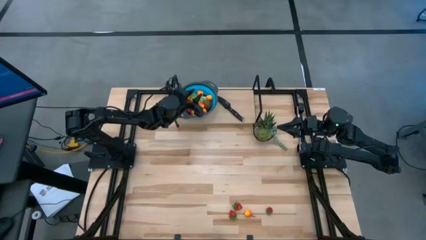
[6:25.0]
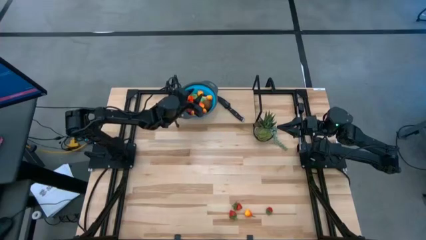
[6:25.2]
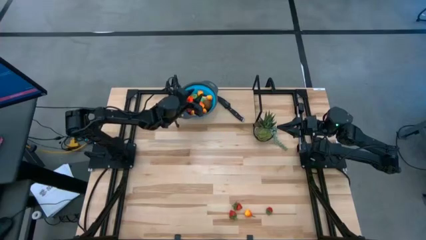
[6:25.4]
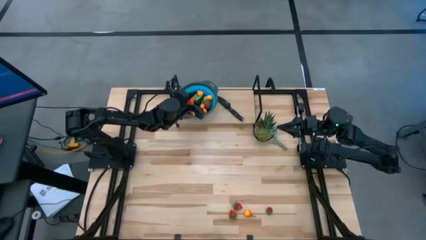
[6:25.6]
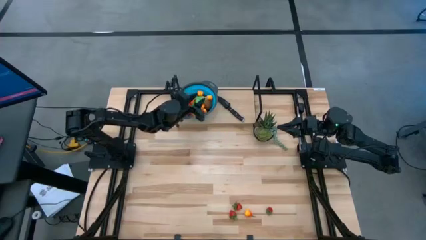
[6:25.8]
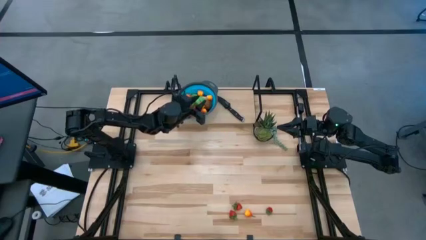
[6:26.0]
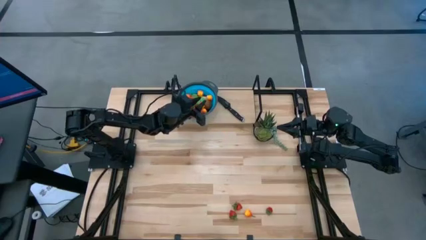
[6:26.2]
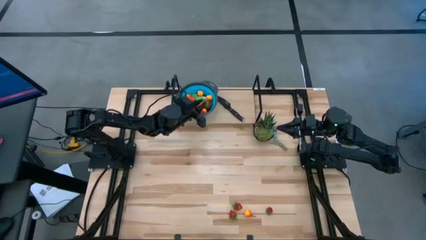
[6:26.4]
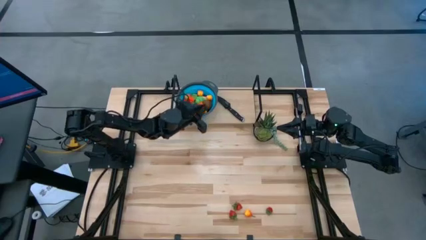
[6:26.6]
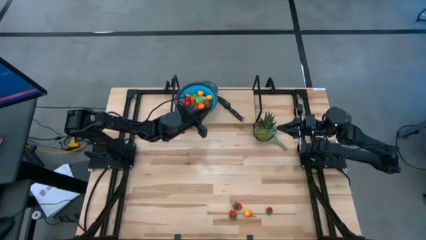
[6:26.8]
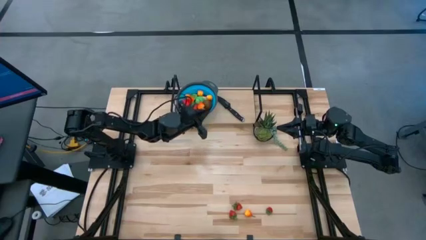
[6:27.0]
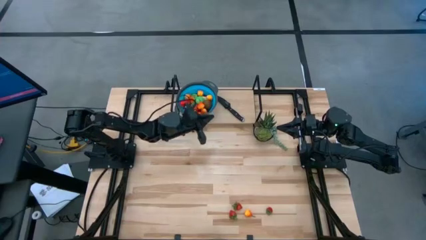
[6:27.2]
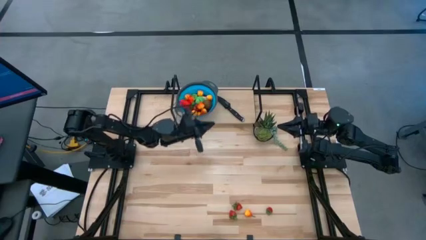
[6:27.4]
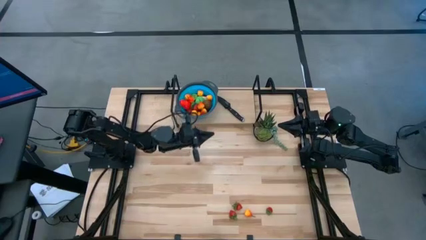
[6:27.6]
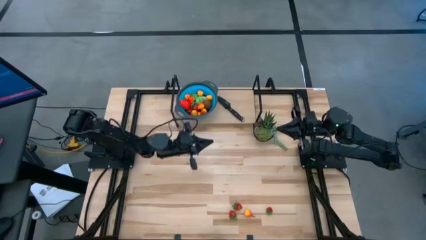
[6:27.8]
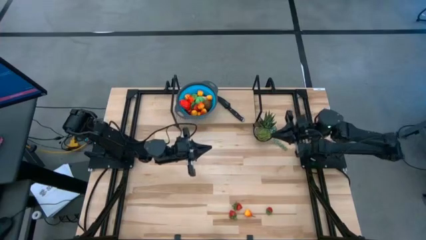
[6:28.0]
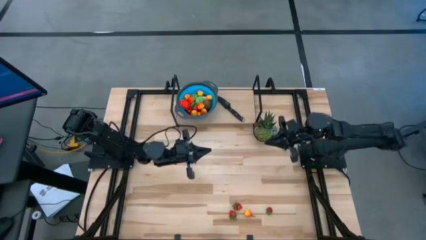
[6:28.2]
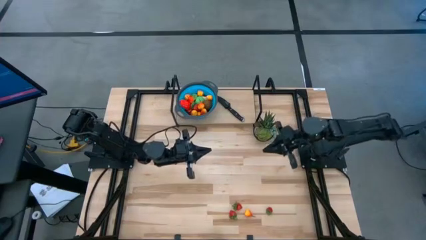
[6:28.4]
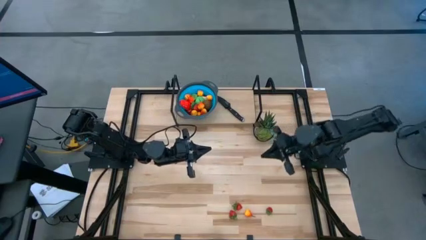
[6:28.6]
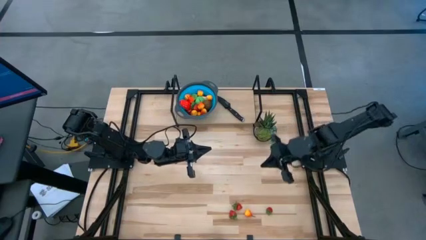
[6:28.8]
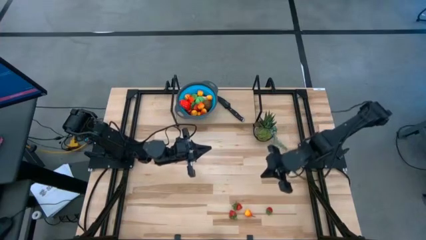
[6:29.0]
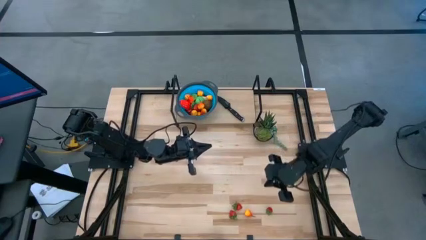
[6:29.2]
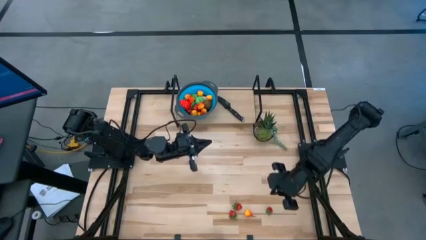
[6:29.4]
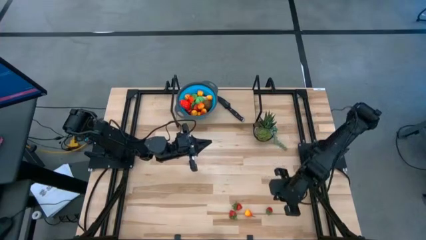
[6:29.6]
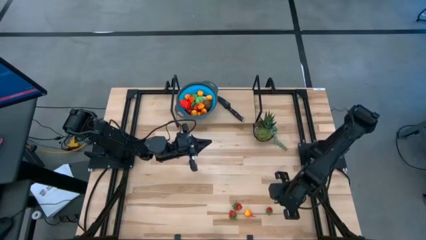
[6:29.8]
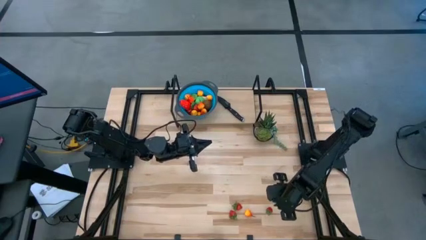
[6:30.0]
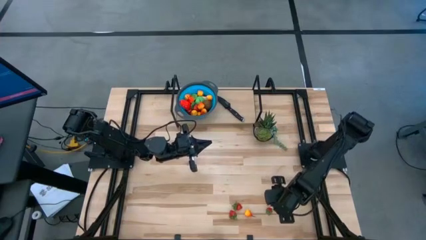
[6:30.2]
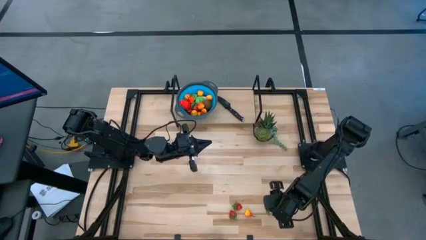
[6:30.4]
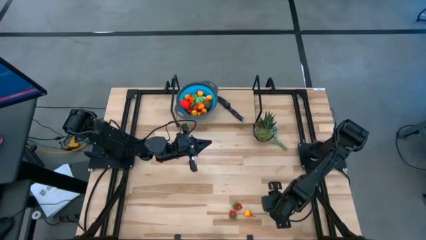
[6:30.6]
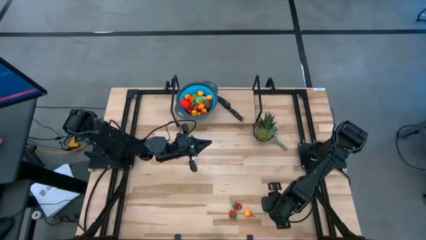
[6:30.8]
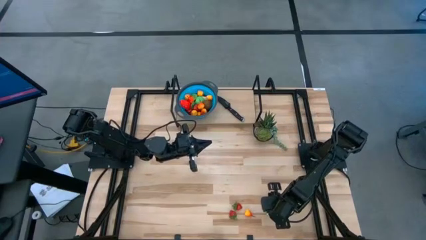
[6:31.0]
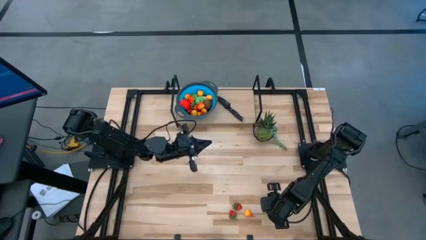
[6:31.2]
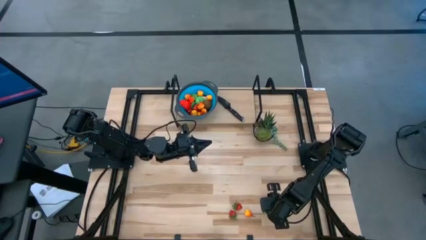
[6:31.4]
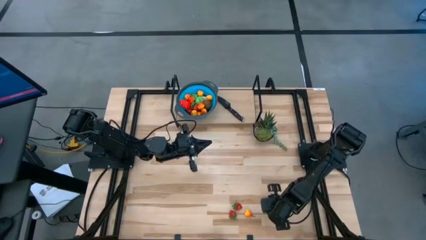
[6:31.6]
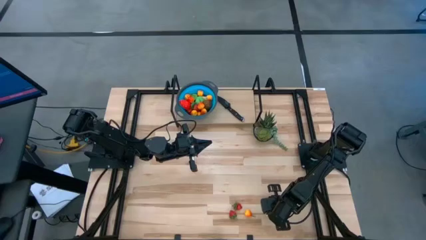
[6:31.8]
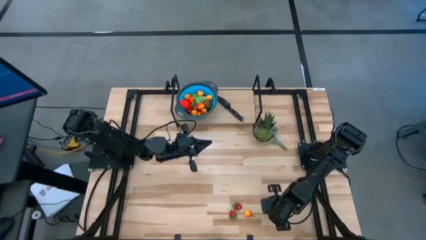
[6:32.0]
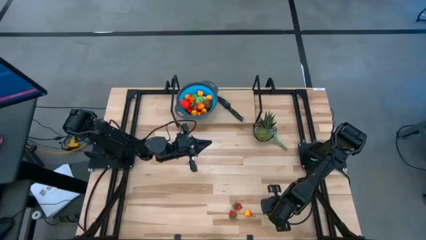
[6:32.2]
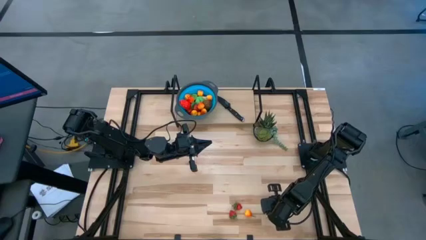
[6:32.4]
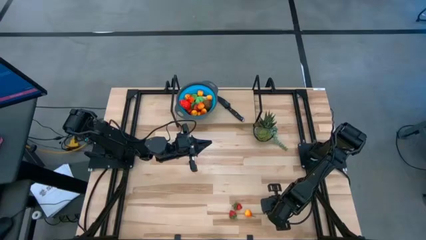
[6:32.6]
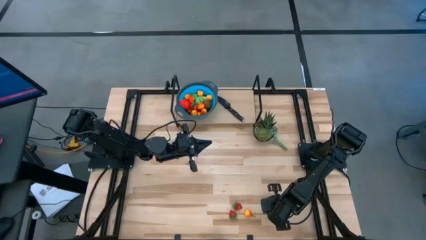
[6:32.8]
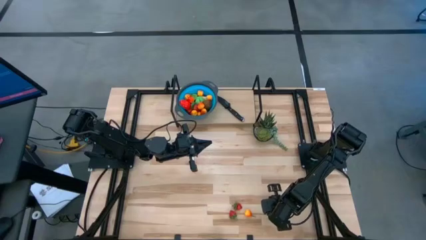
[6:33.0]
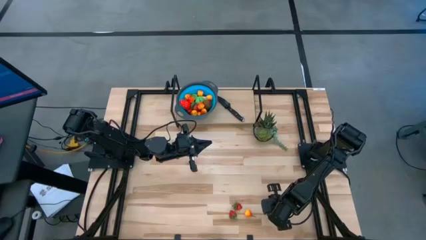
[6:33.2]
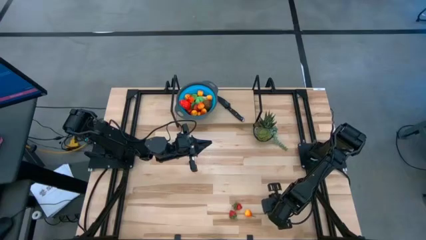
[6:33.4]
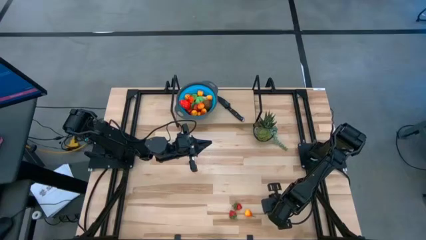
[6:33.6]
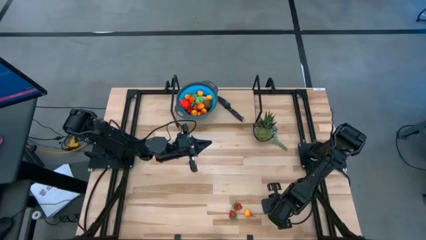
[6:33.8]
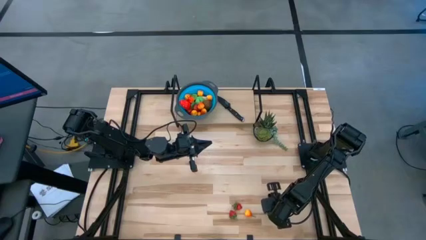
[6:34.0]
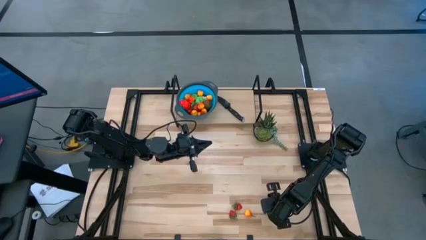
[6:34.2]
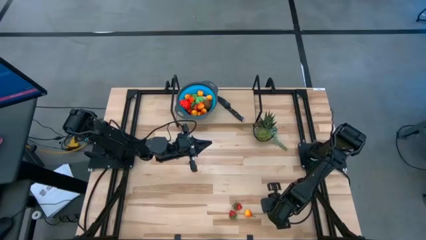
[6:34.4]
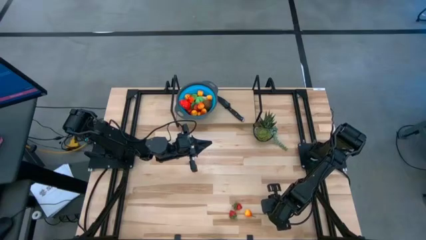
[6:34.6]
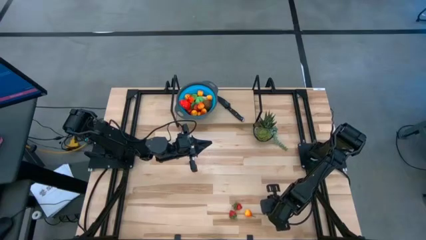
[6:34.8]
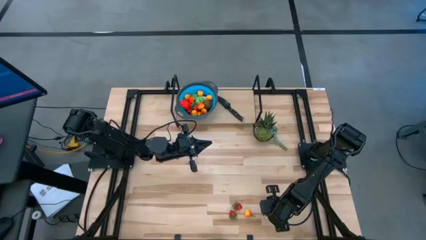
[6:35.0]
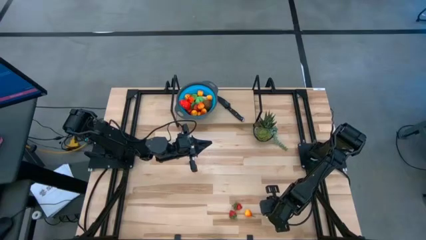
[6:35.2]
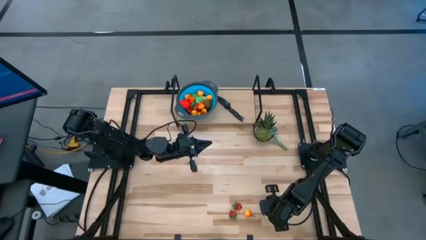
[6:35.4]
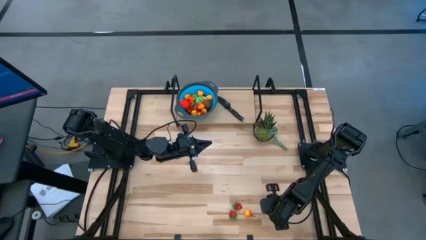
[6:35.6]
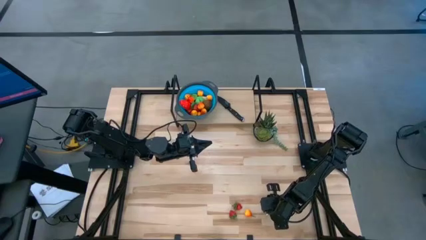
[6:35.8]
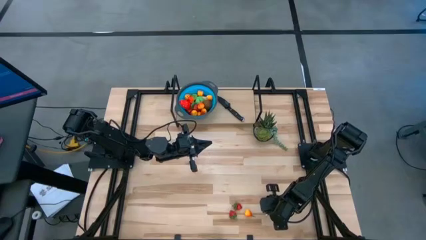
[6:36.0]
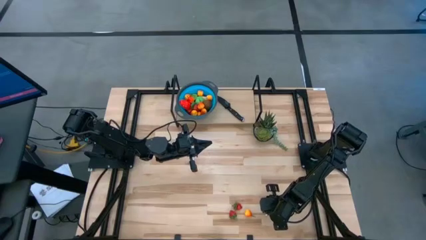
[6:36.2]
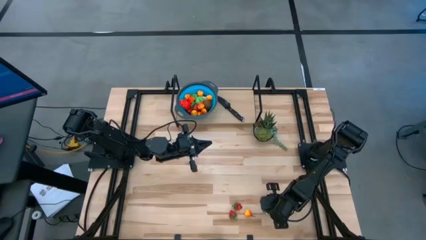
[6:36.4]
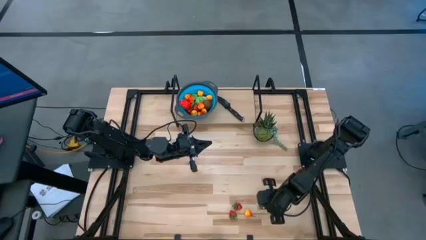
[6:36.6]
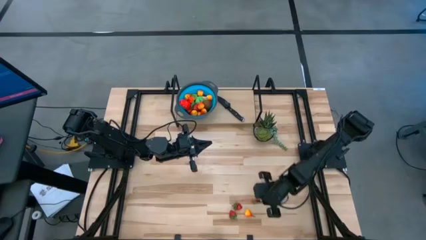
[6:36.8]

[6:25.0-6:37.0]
Task: Pick & Place Fruit
Put the strawberry into the basket

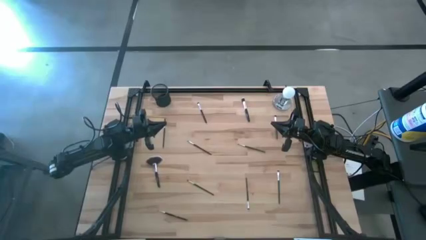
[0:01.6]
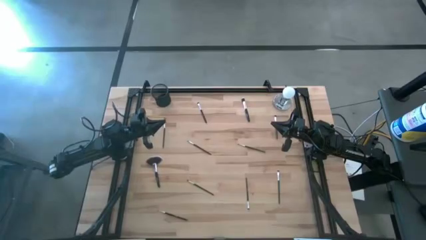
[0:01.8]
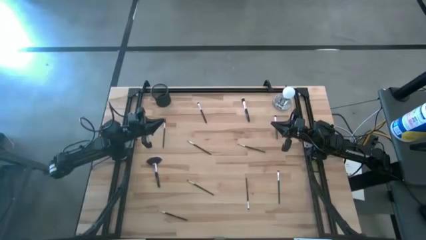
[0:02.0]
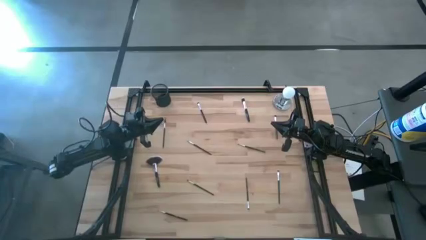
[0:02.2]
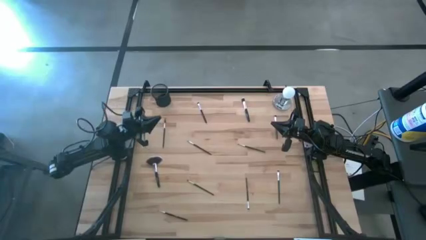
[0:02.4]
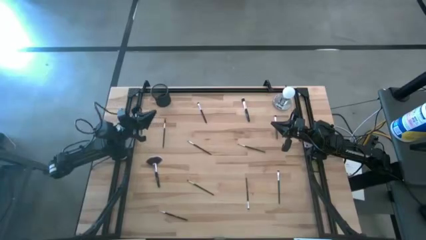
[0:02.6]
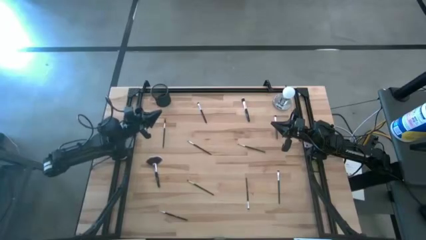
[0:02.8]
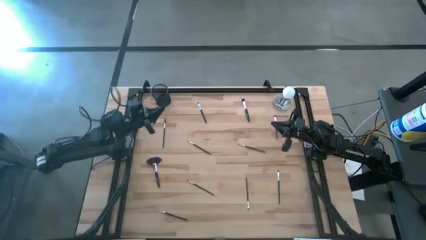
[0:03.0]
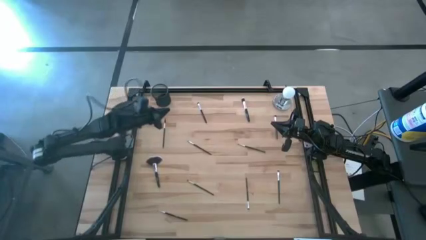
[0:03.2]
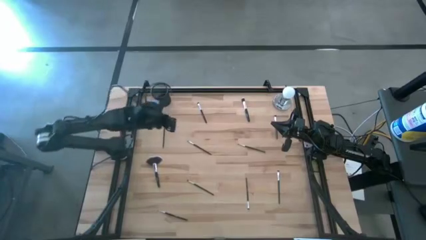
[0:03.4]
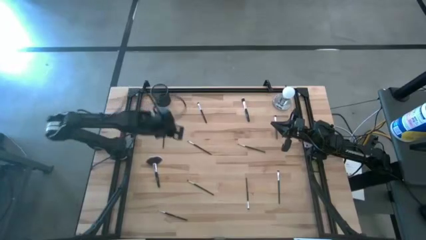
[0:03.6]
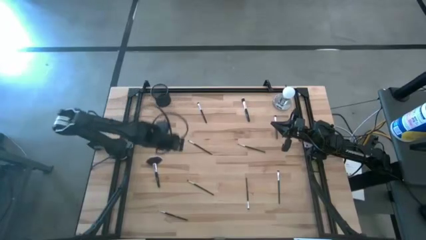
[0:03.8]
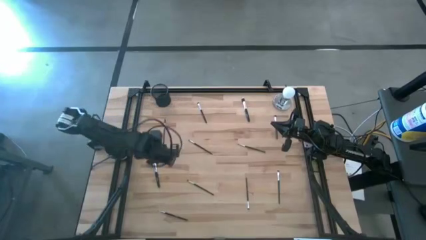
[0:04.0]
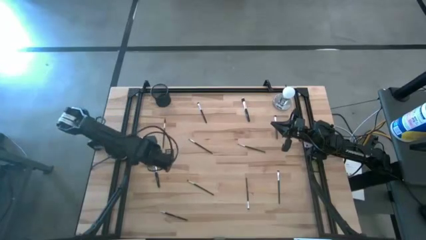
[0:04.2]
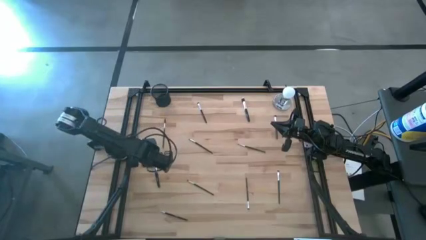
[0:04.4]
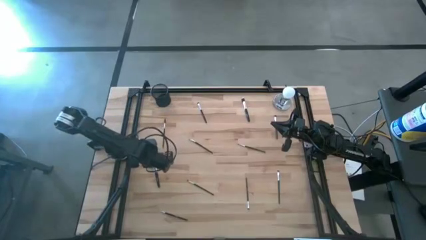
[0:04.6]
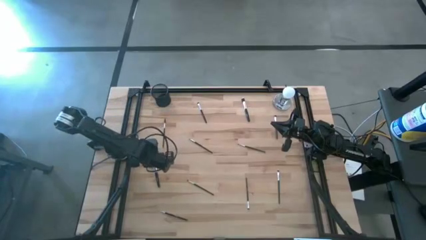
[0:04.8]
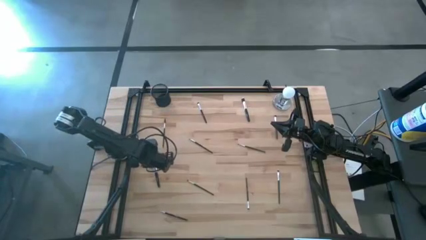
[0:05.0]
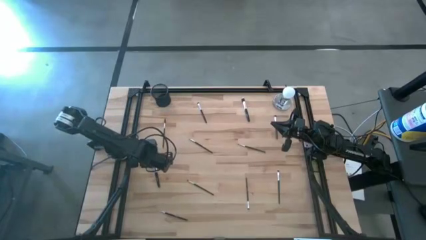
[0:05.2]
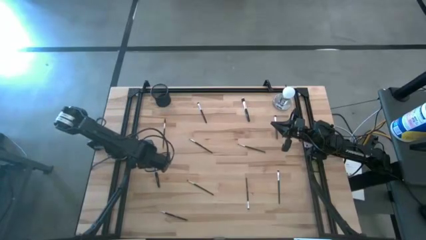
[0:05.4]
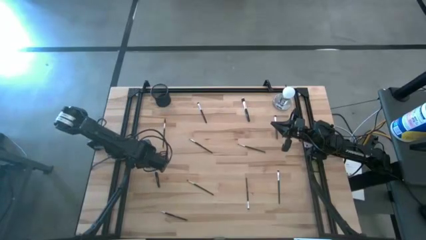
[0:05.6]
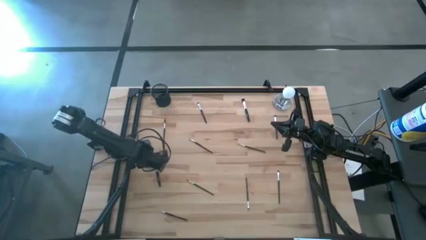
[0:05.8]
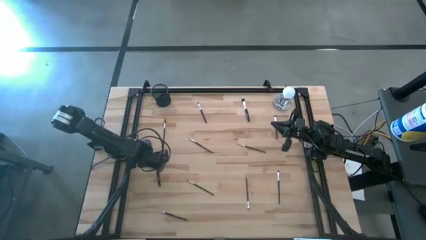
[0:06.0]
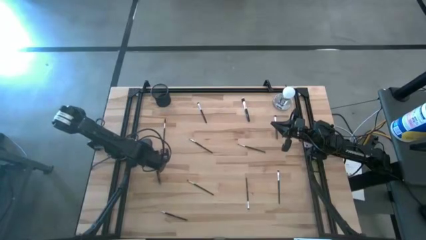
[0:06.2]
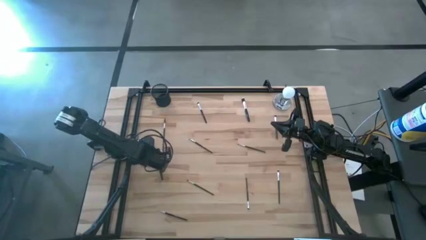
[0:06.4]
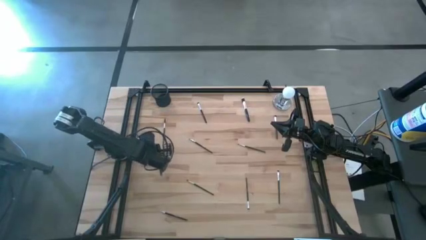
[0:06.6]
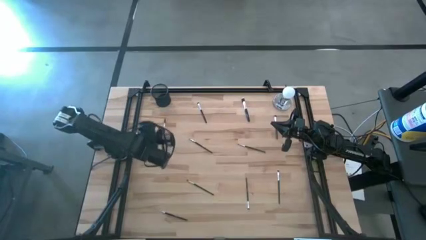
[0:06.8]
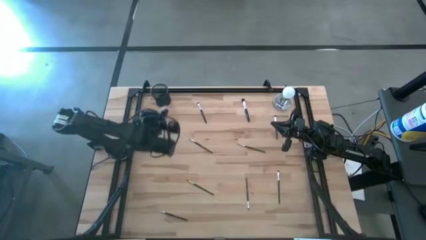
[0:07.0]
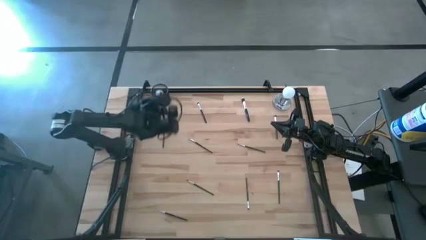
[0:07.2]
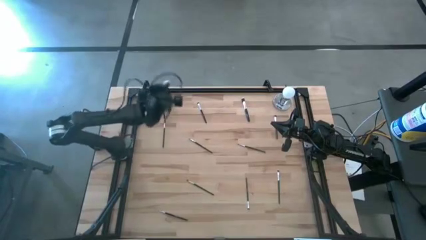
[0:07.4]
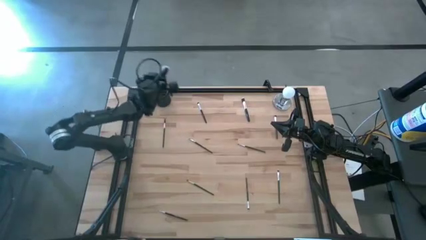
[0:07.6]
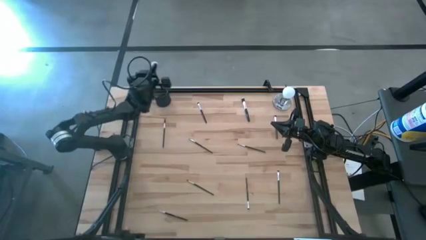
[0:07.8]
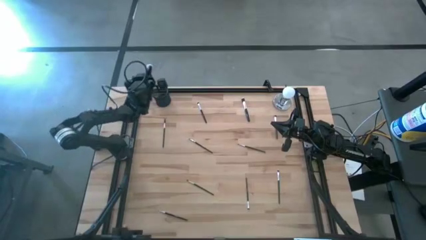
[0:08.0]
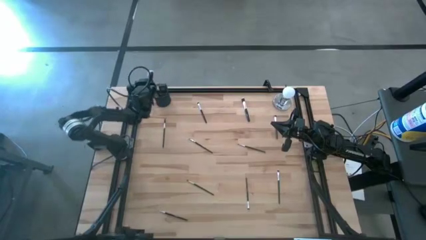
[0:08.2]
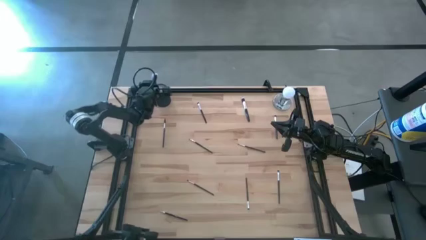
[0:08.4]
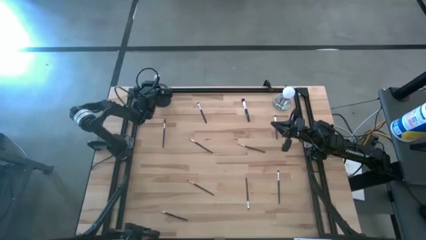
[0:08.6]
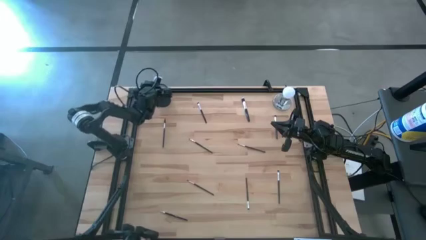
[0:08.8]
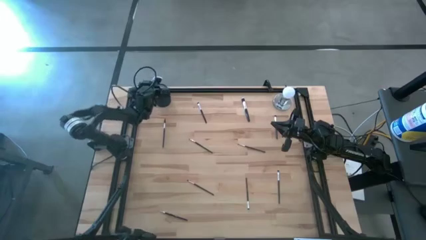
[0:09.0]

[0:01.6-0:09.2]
Task: Put items in baskets/containers
Put the highlighter brush into the pen holder
